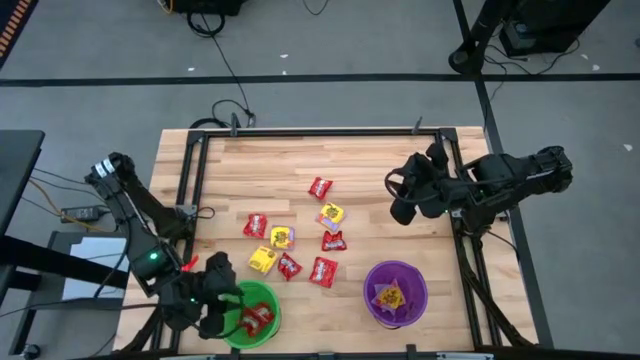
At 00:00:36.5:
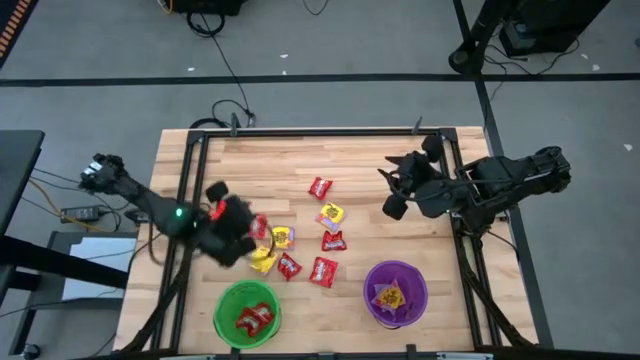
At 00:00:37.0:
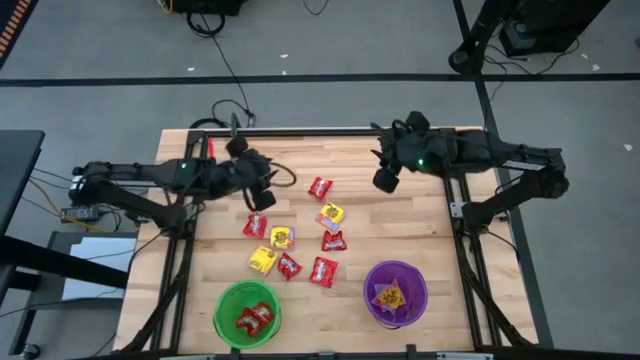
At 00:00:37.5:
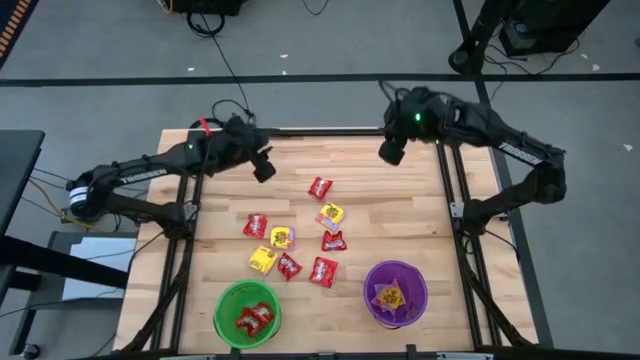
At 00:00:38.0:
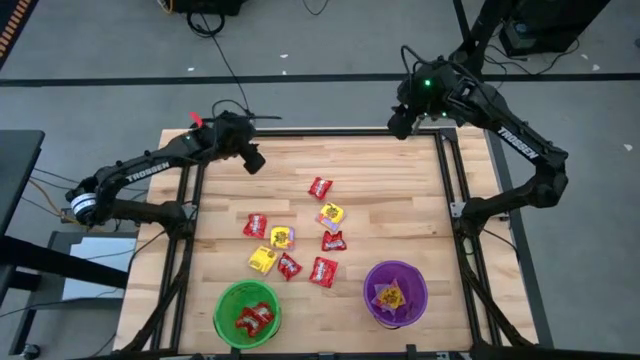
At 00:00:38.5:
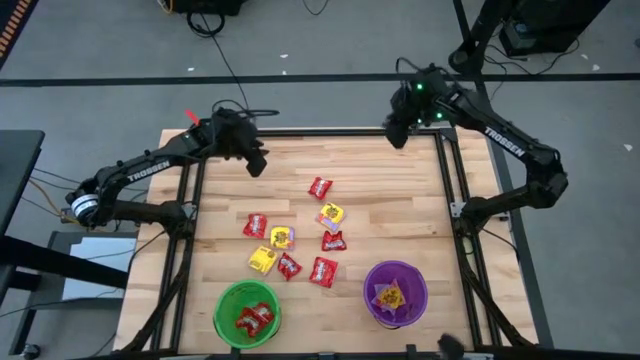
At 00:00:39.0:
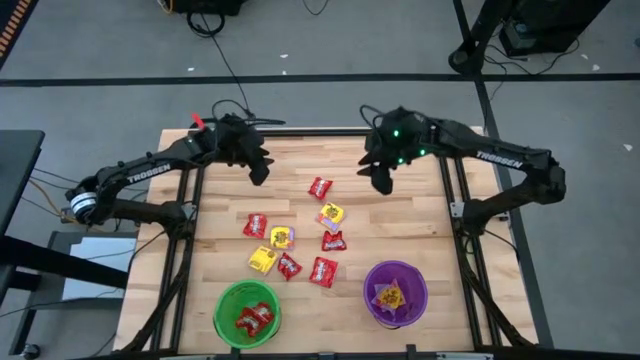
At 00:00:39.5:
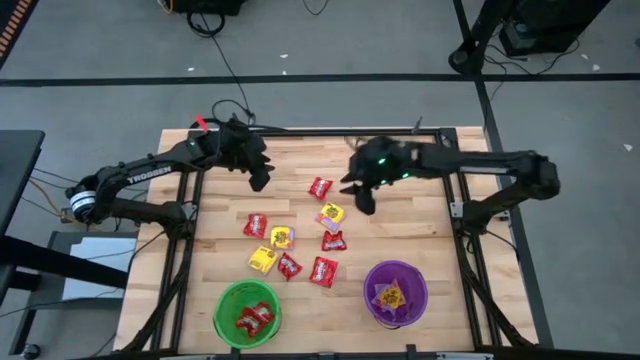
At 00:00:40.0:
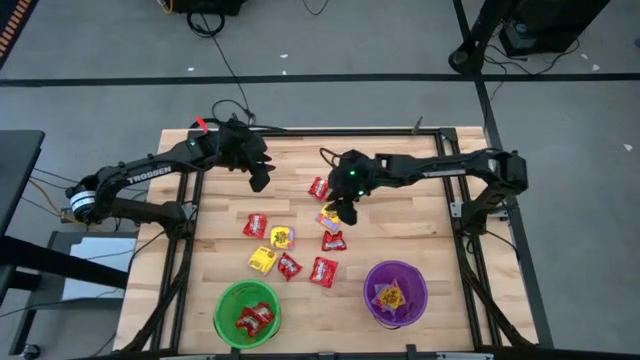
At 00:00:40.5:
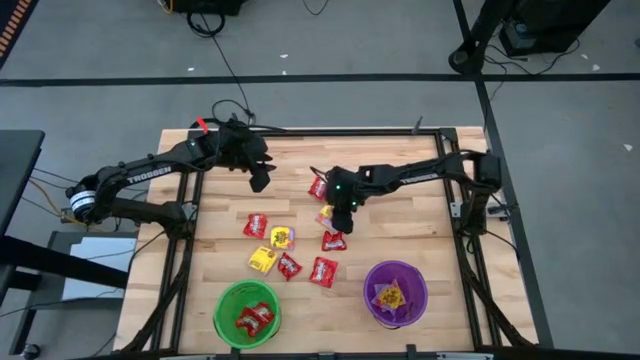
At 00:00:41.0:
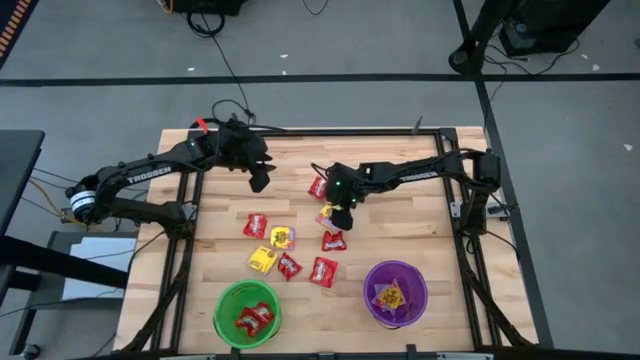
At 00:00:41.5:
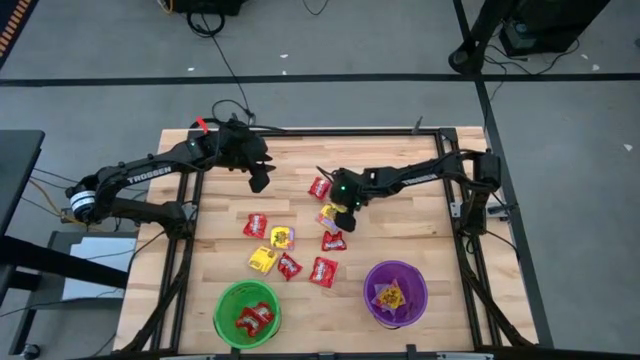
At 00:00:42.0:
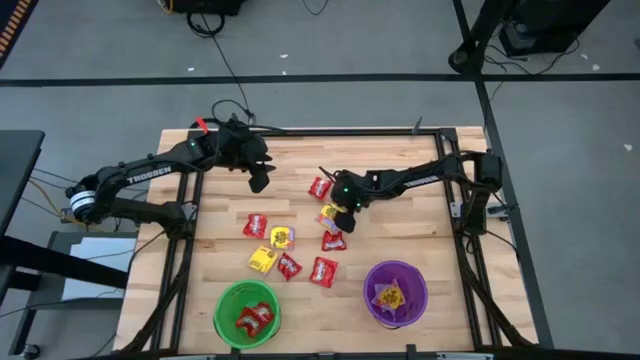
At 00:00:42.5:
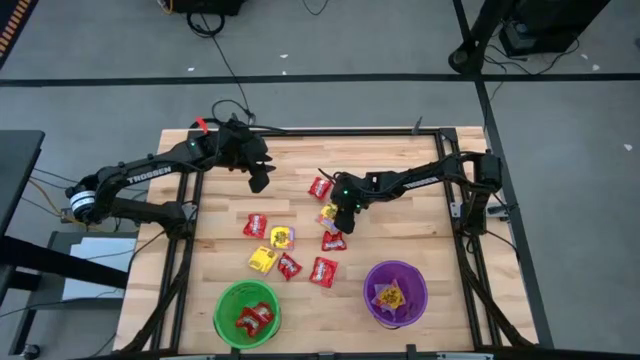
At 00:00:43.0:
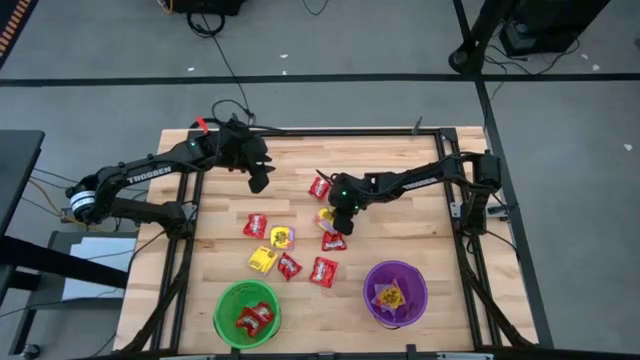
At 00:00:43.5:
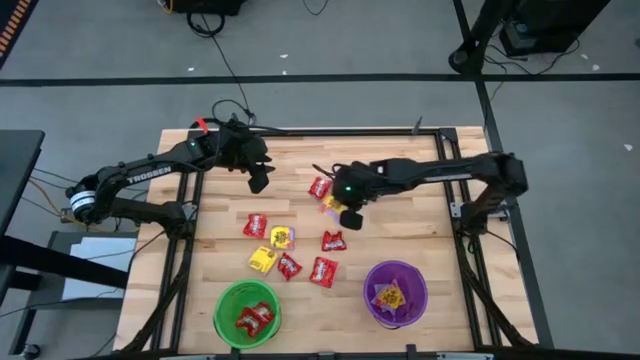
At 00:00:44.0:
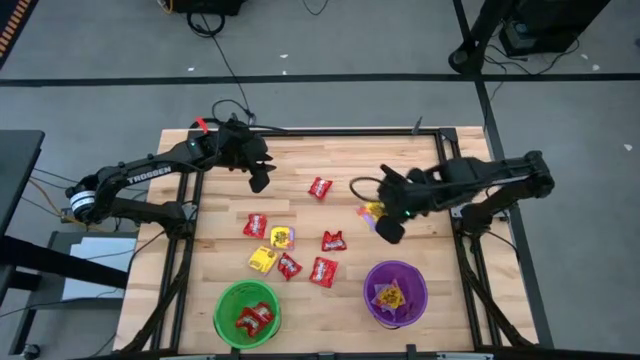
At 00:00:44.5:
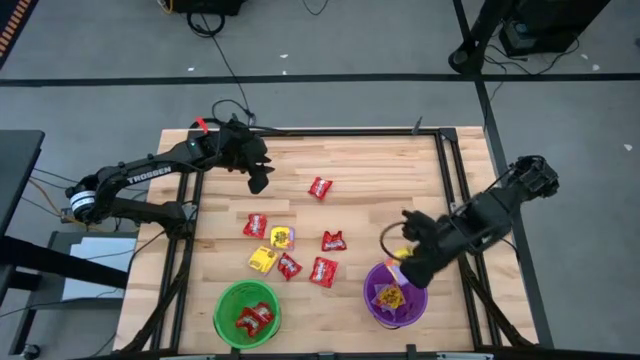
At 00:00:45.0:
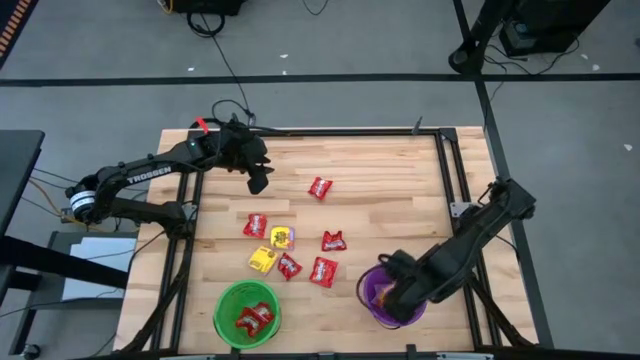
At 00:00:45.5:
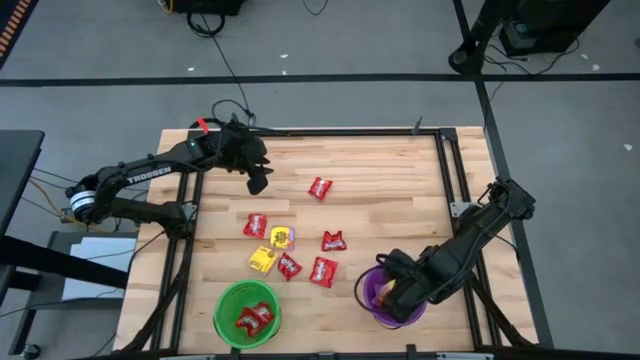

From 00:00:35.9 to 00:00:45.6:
Task: Sort candy by brand, put in halloween buckets
Put the yellow candy into the purple bucket

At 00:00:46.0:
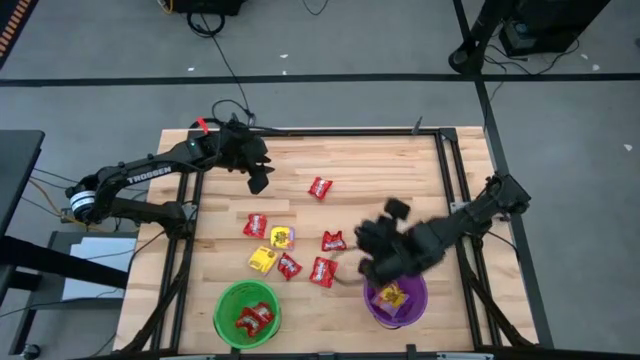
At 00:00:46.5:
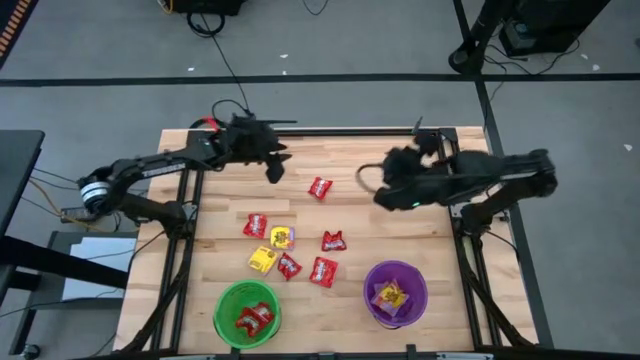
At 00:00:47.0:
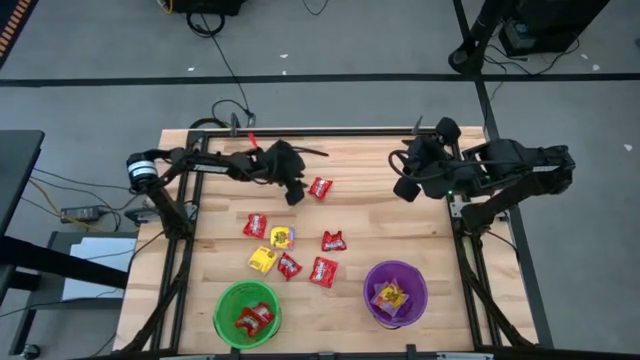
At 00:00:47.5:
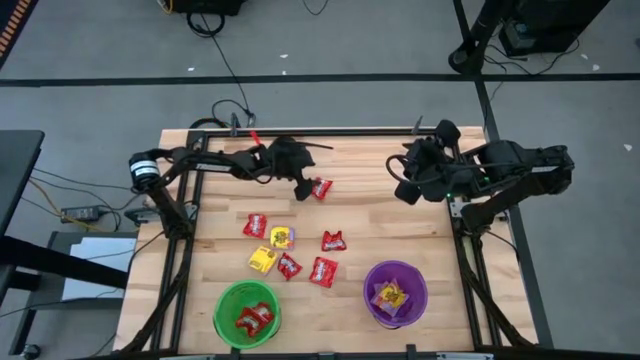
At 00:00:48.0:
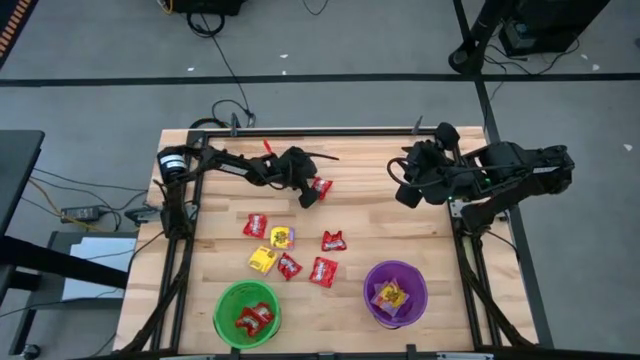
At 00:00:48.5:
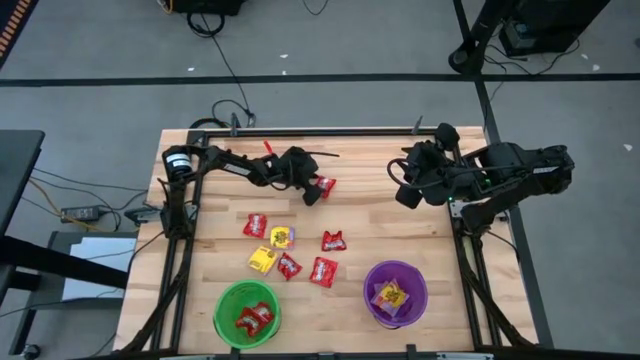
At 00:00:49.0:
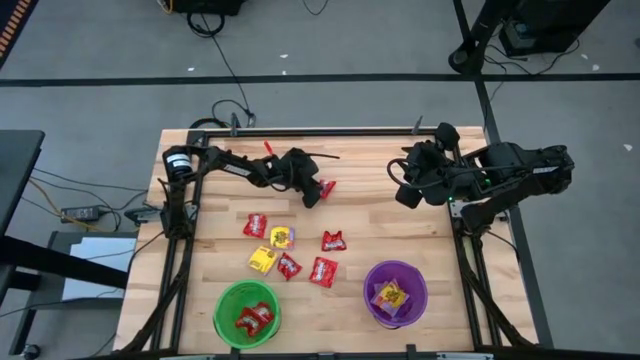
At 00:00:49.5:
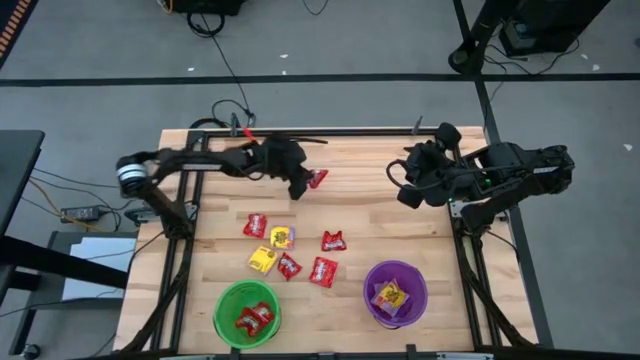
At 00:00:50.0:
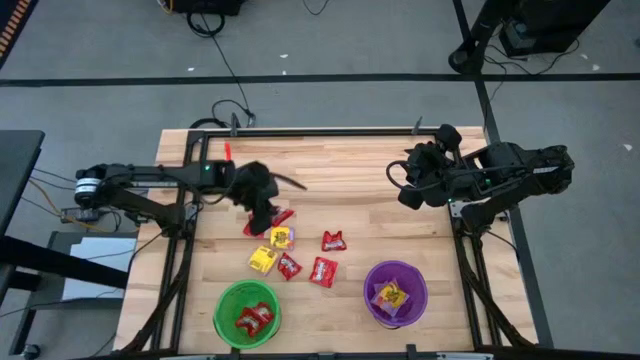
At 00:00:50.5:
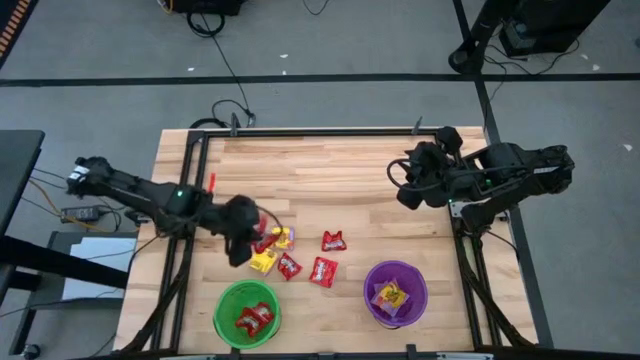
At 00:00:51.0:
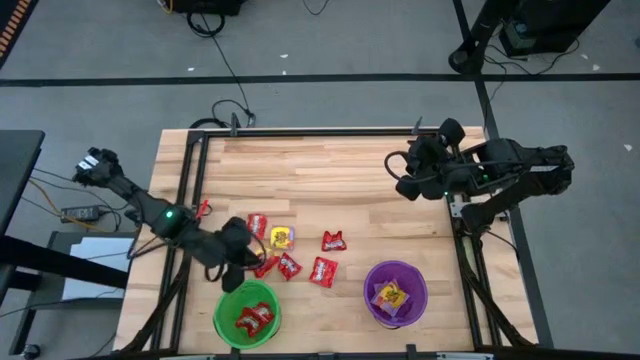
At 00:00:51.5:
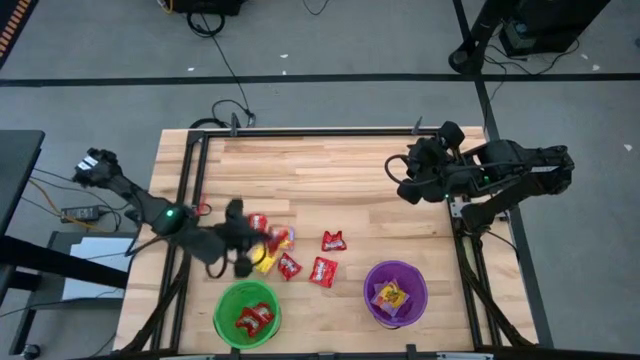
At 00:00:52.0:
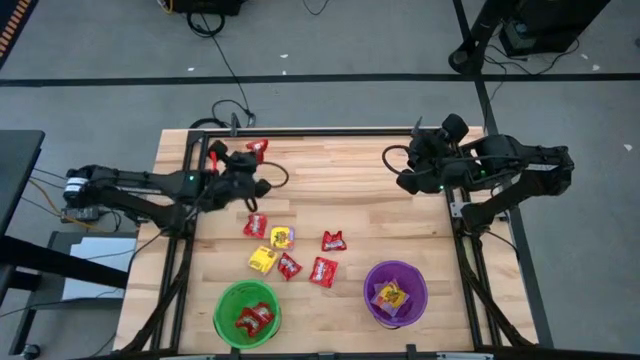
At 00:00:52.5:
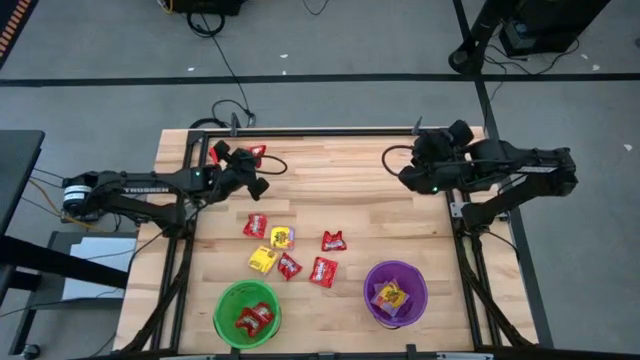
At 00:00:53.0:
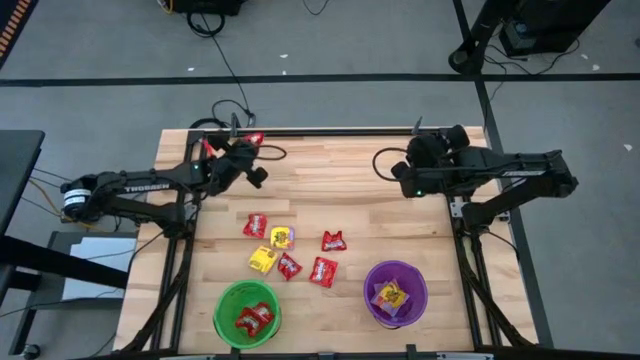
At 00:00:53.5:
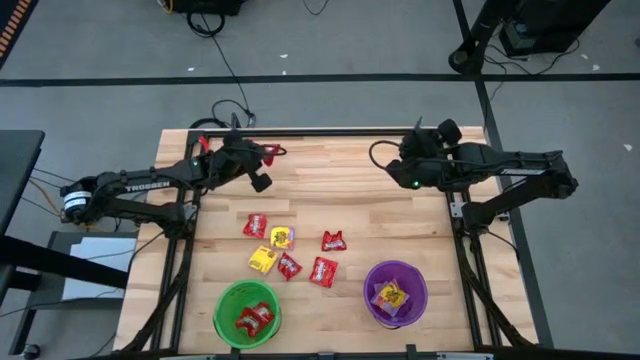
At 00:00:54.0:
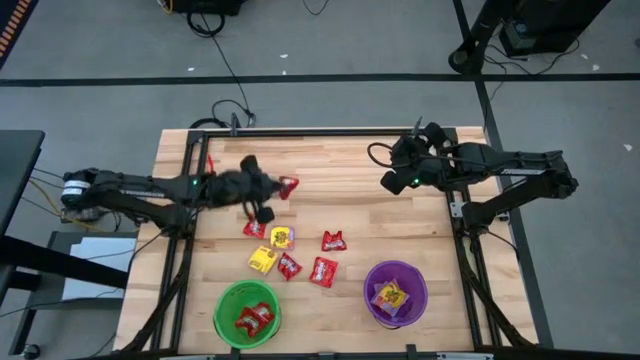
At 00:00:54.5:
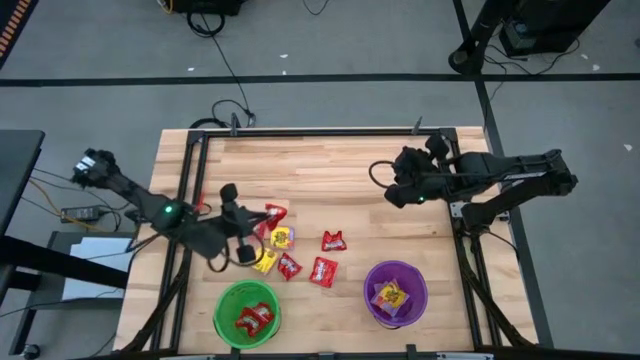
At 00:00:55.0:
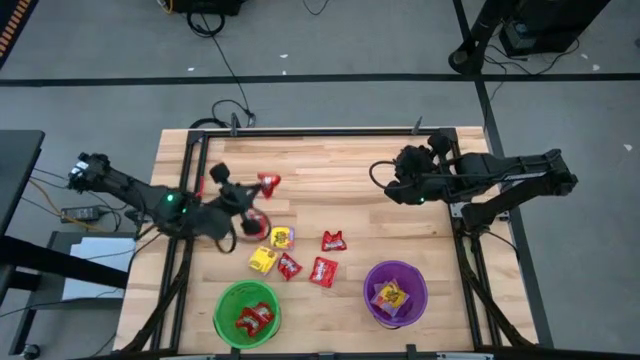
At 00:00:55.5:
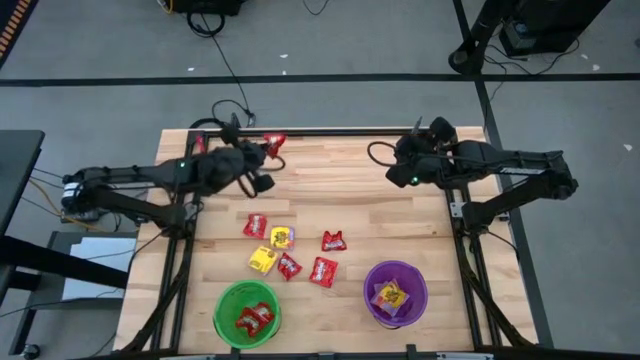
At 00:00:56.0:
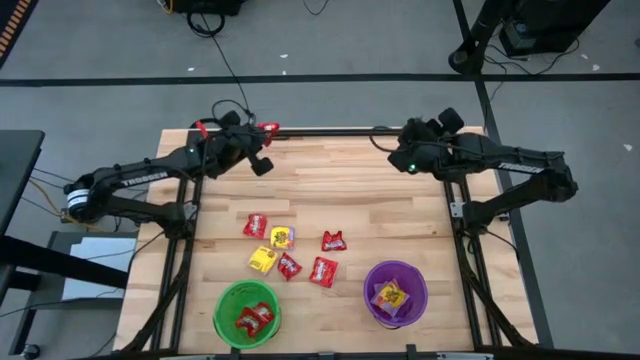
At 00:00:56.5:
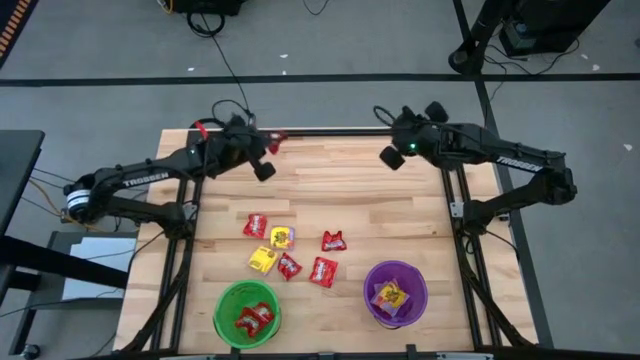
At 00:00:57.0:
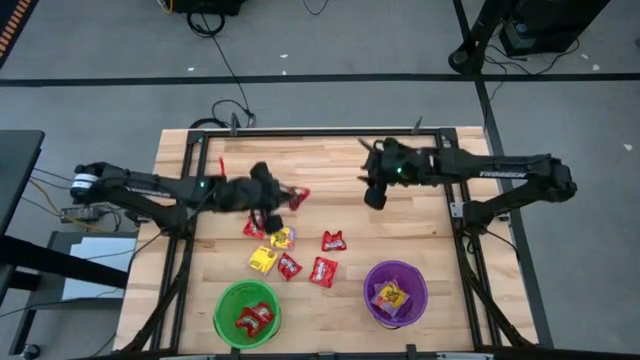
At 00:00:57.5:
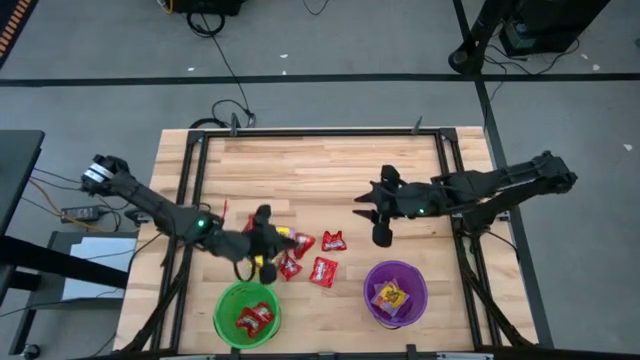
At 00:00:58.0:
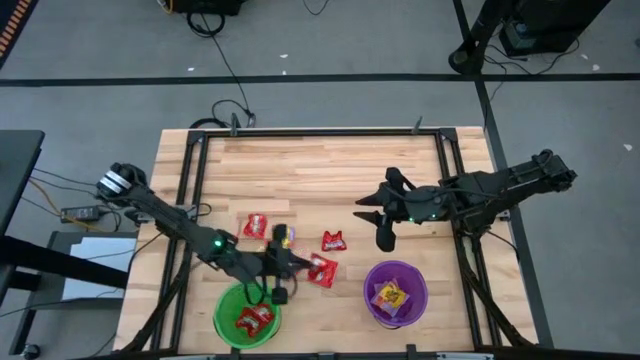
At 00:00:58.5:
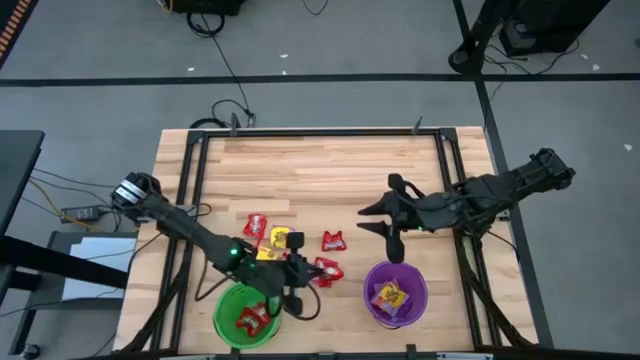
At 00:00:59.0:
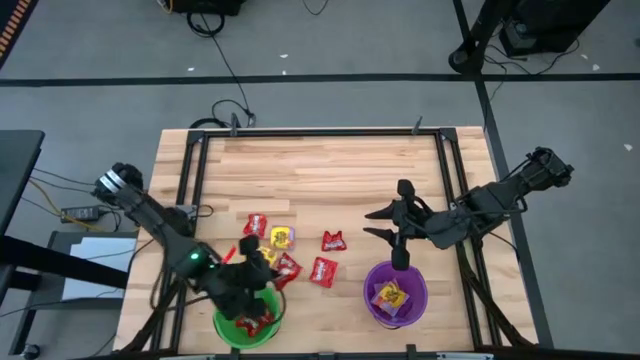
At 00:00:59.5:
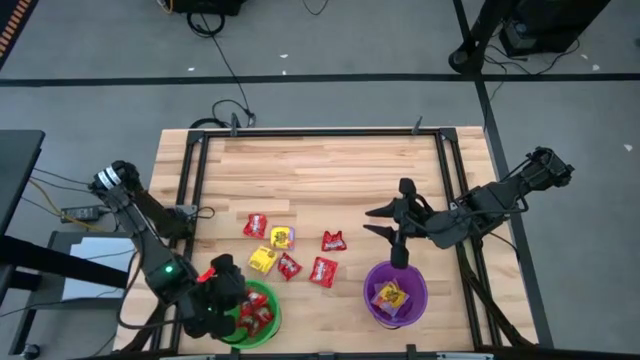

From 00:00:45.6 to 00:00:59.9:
Put the red candy into the green bucket
